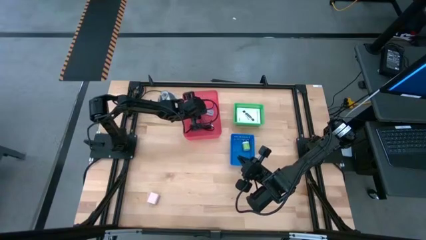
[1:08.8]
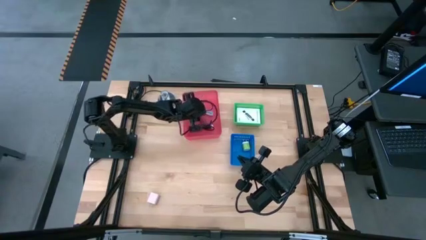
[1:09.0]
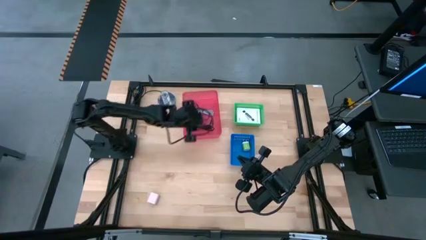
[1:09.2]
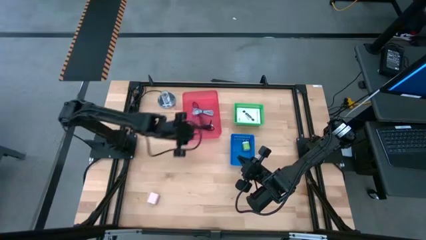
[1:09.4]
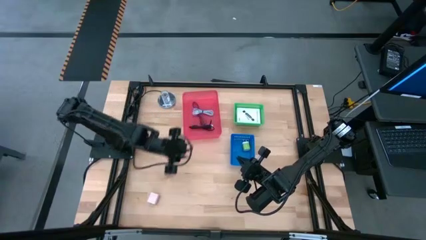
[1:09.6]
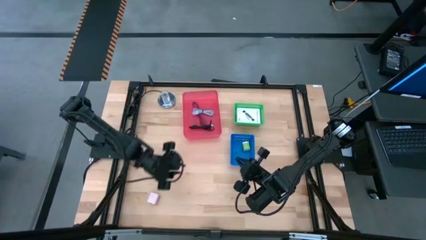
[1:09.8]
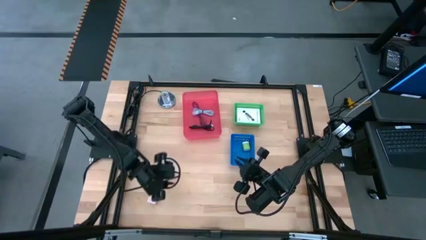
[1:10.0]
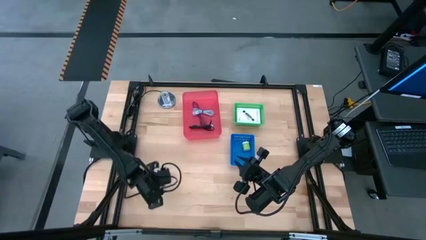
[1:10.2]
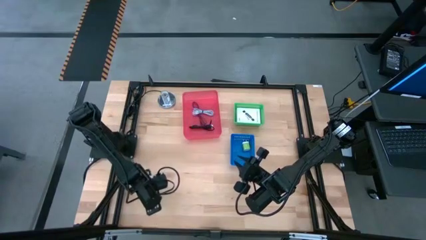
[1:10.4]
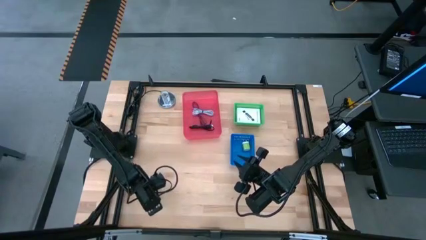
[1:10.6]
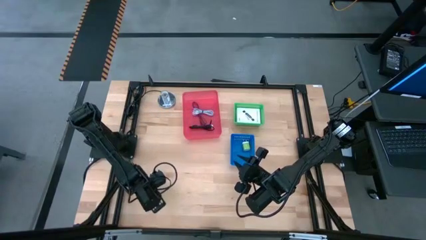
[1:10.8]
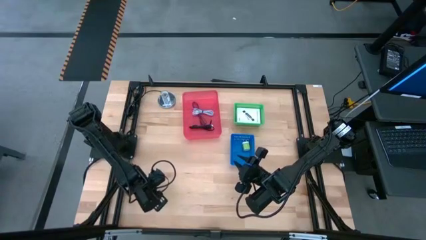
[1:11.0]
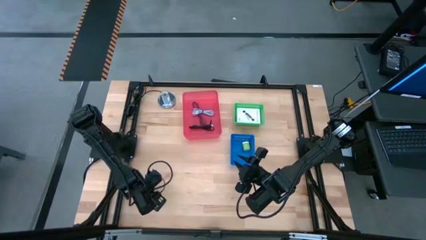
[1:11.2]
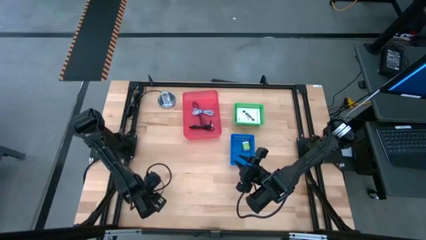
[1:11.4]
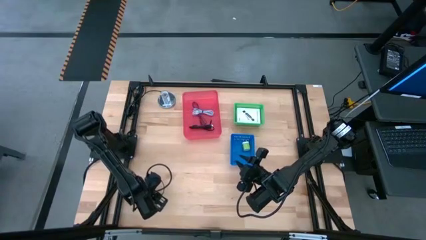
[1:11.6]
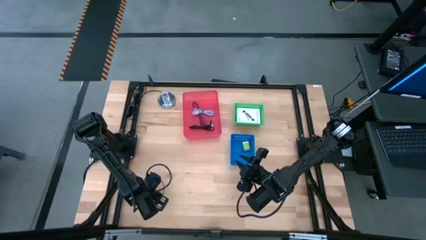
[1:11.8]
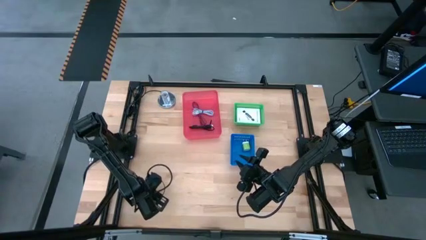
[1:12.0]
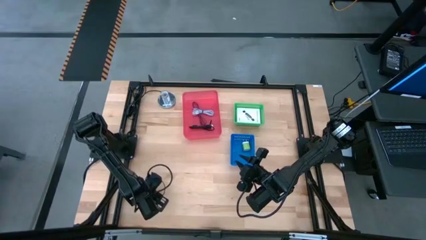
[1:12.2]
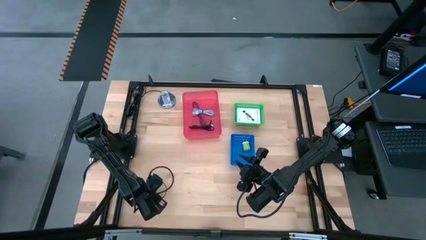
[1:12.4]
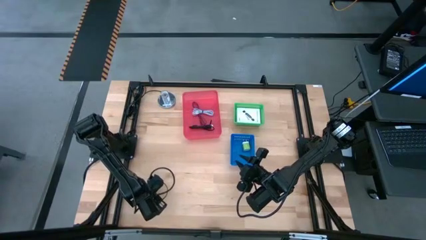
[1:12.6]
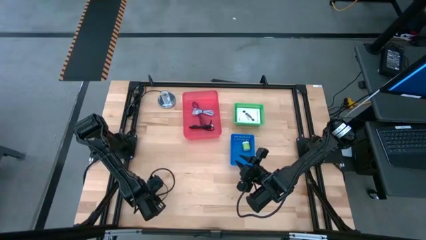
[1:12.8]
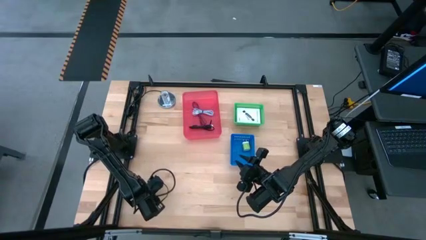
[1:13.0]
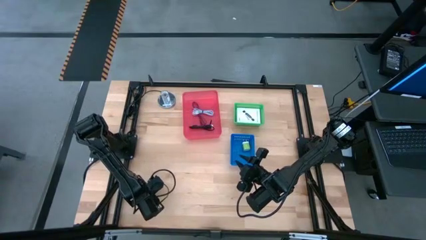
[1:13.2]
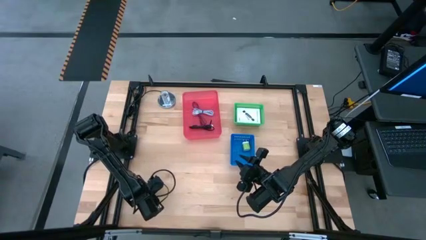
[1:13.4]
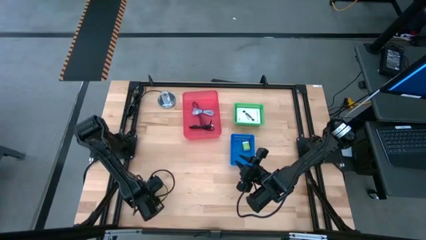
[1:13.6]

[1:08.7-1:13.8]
Task: Pick and place items into bin
Put the white charger adapter into the blue bin

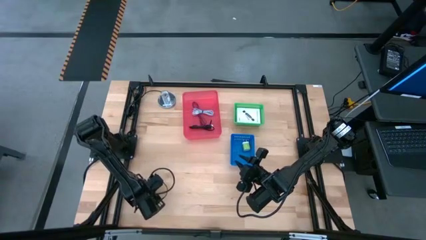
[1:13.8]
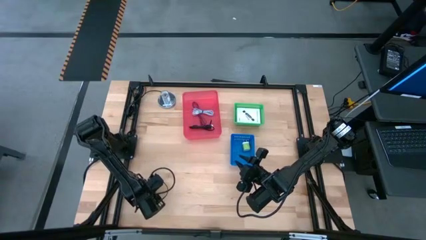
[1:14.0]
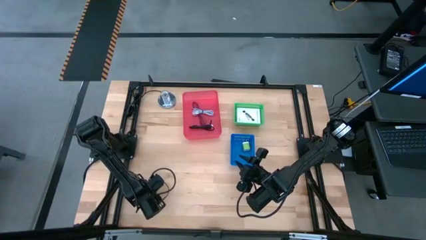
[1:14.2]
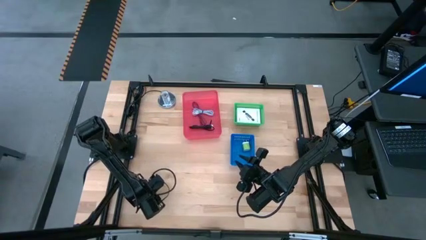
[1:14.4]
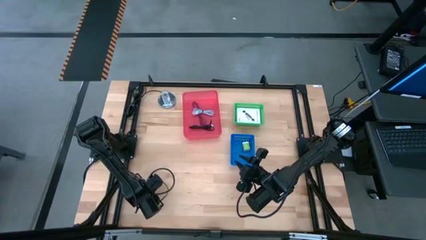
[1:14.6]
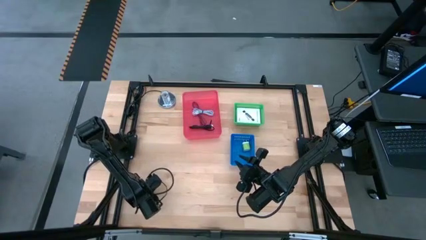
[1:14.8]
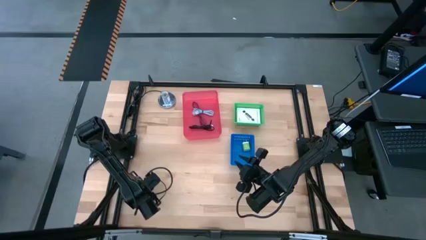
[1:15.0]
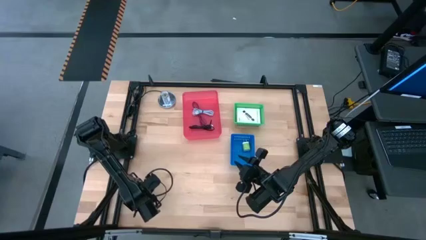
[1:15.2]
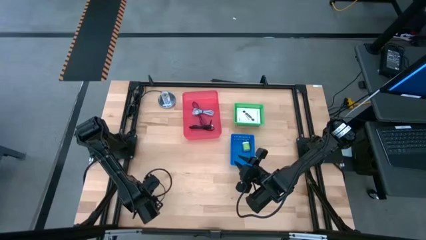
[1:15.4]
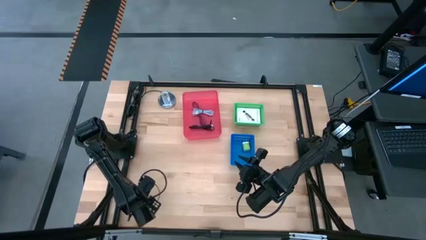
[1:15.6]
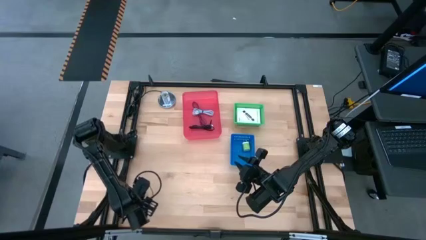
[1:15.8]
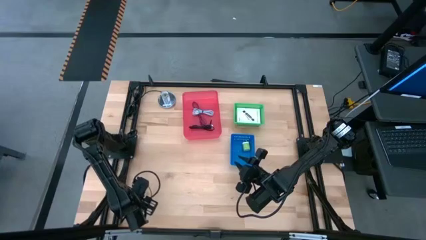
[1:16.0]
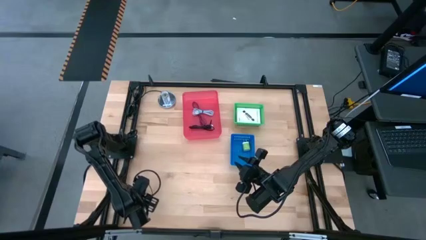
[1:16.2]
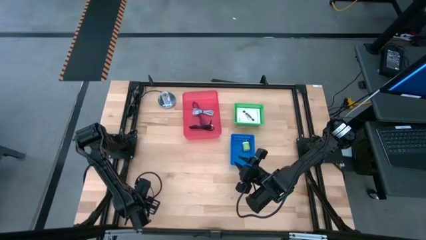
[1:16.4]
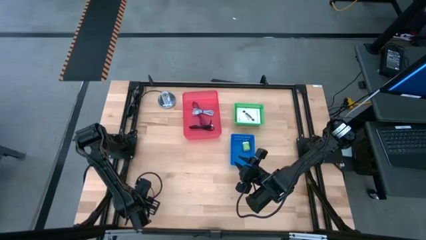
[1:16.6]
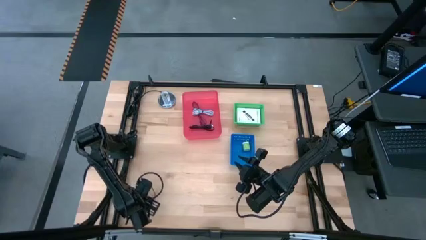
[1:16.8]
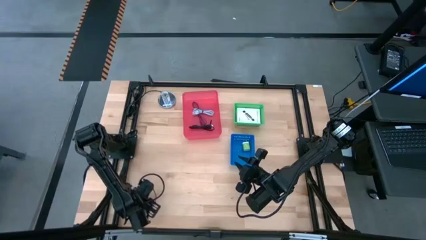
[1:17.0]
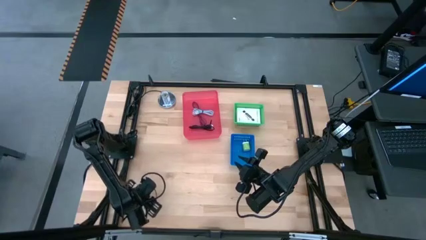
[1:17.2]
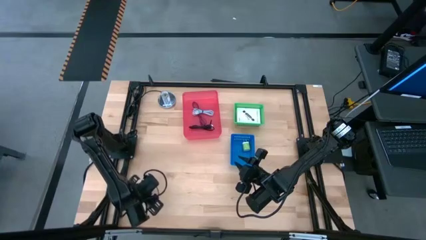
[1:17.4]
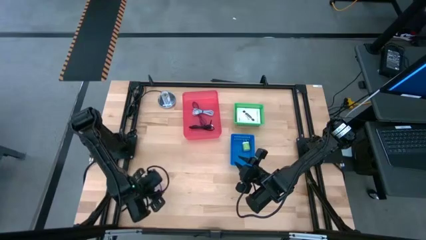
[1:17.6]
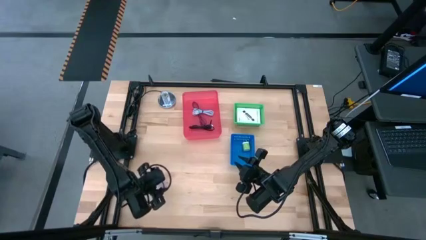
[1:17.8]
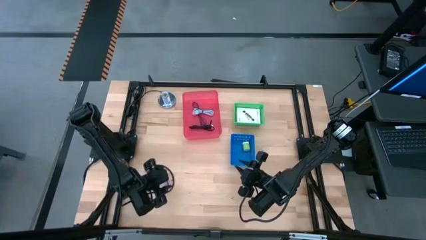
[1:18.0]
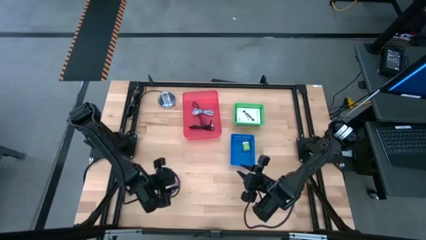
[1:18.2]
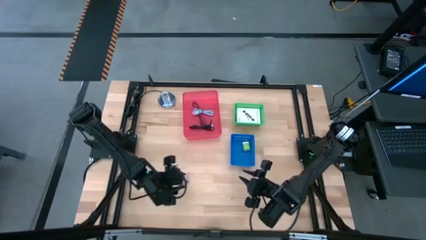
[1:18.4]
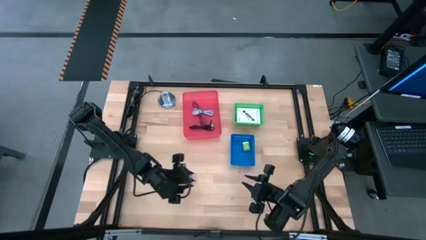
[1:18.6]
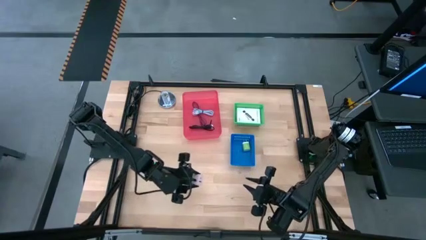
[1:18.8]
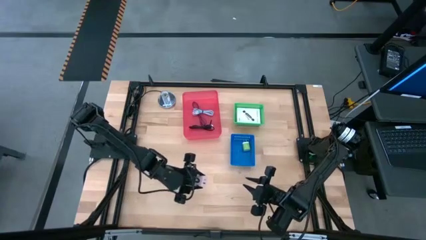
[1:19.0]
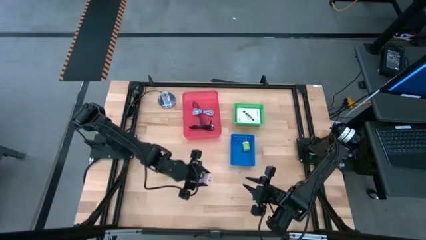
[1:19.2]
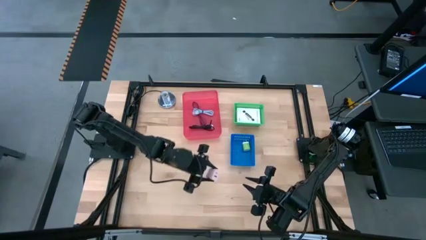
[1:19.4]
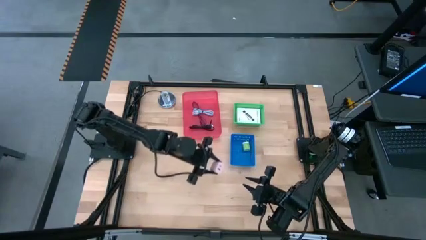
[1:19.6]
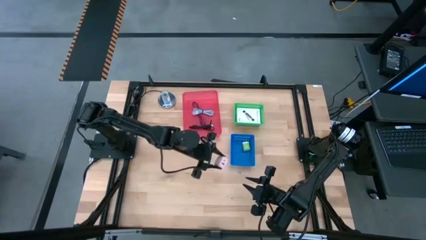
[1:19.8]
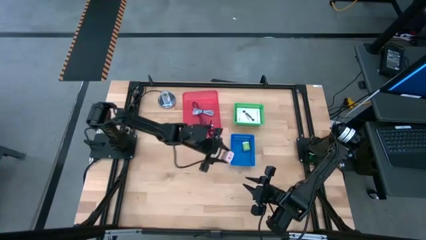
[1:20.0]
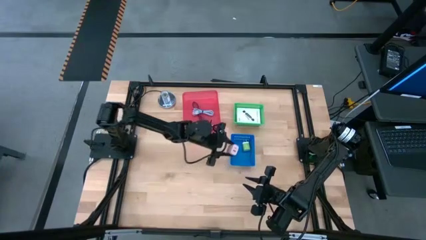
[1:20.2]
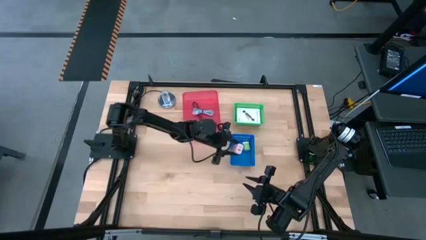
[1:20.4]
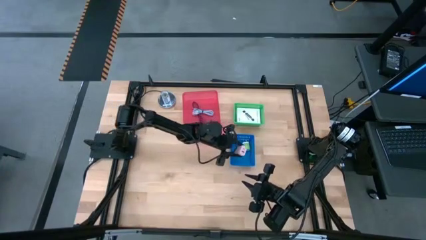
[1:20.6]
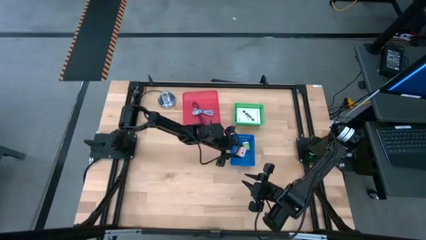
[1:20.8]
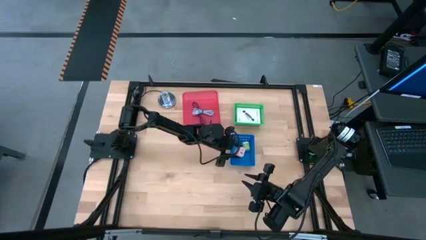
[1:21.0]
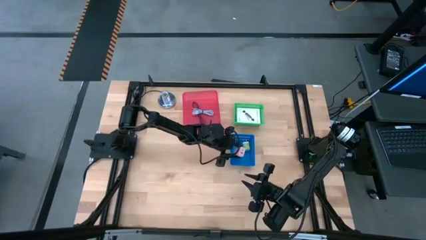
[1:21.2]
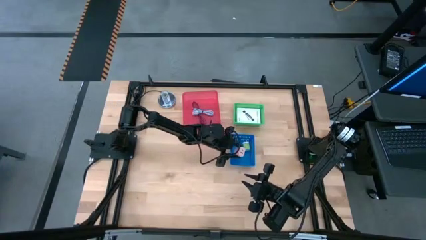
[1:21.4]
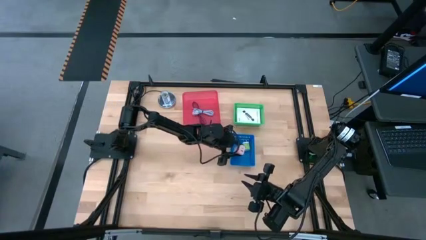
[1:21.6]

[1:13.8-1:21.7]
Put the white charger adapter into the blue bin

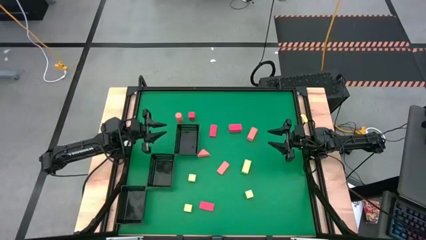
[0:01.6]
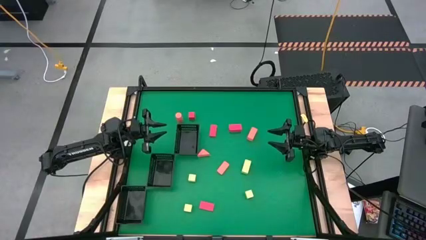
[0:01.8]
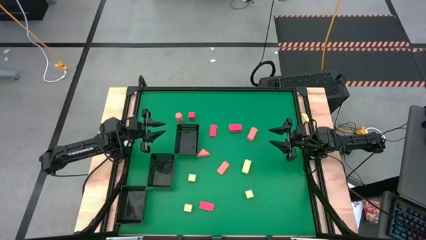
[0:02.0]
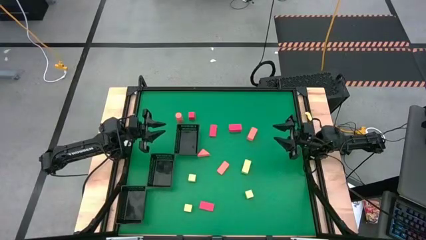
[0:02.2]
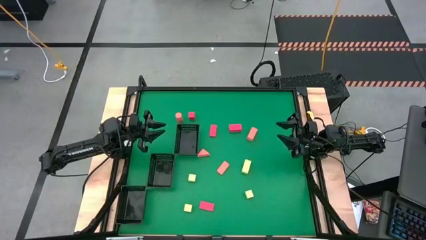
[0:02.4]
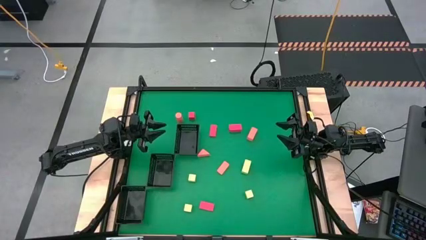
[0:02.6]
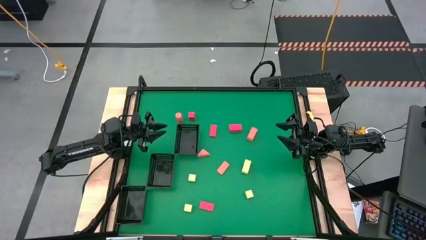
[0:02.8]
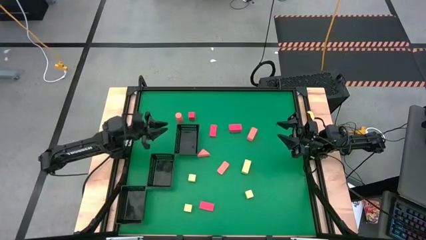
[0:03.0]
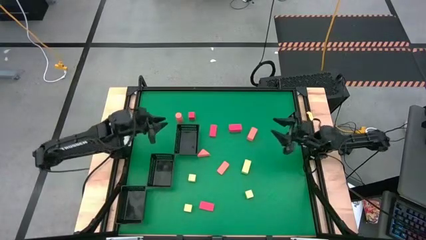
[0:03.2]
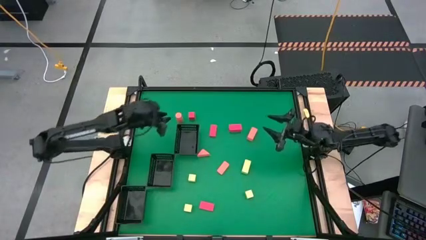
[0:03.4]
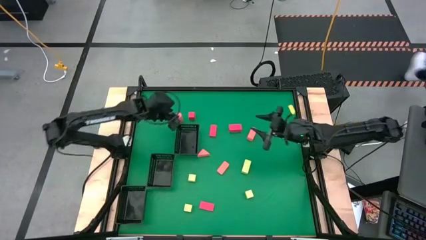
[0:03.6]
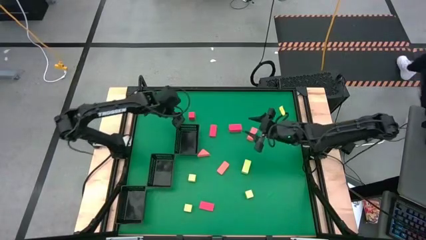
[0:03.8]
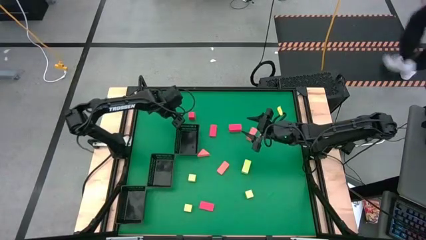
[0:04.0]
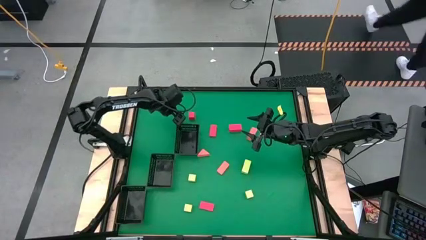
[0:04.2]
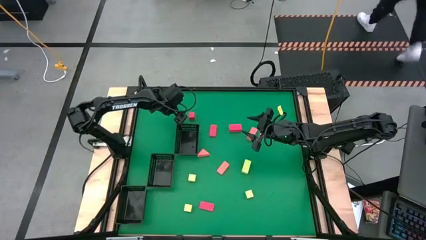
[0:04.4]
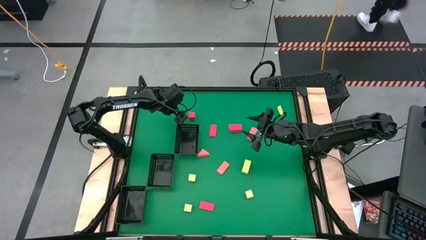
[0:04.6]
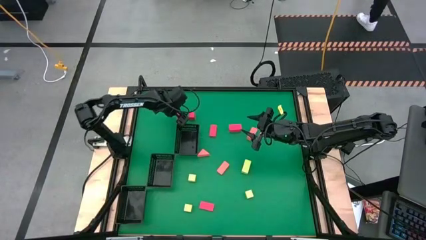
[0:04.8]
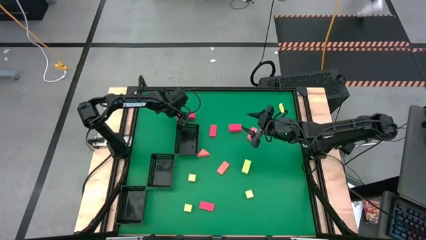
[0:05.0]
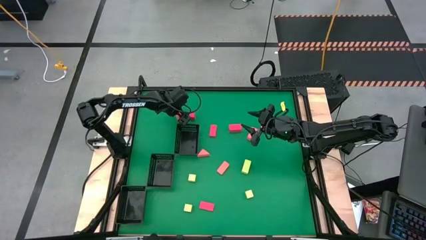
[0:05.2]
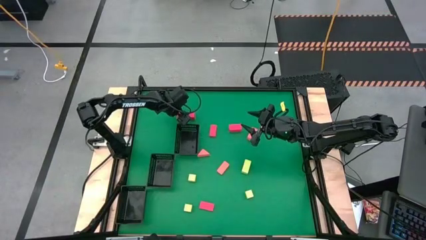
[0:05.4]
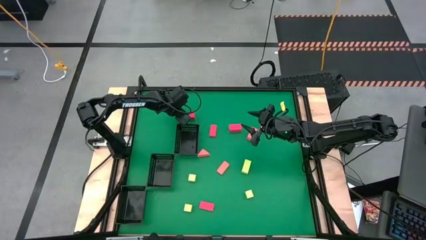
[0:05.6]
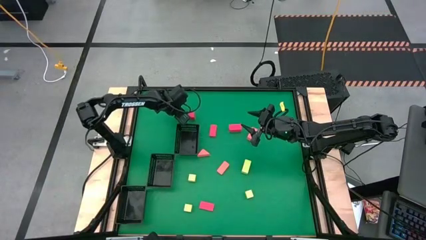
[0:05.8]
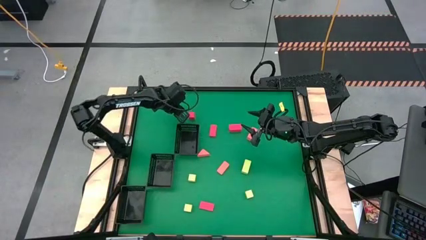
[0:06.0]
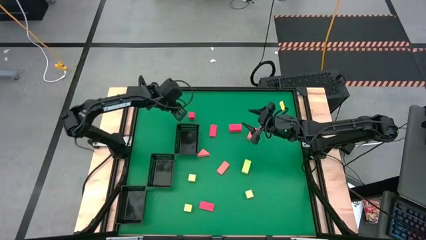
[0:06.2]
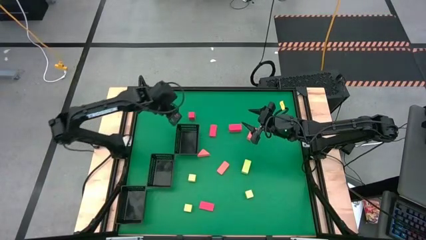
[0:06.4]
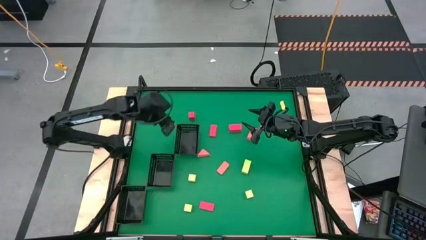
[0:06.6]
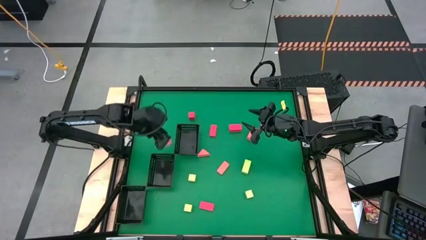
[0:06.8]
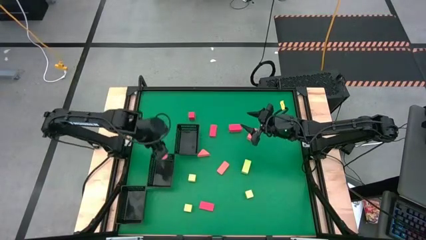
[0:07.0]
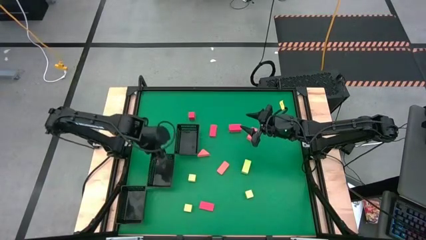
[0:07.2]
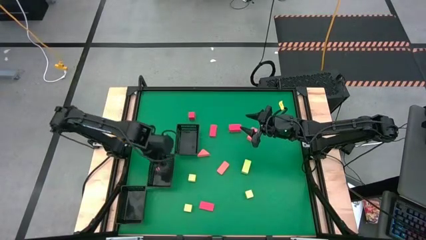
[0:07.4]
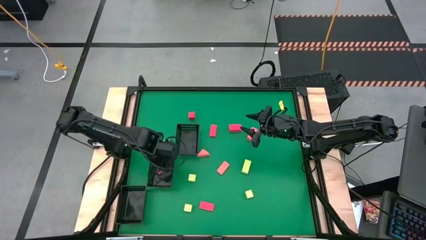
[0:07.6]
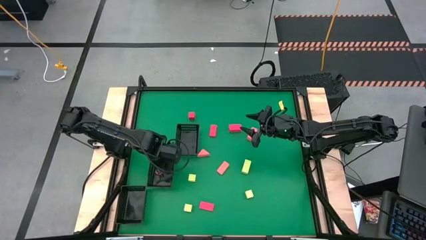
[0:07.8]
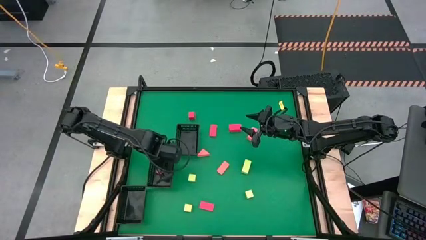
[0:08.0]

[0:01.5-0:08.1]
Task: Sort & place blocks by color
Put the orange block into the middle black bin
